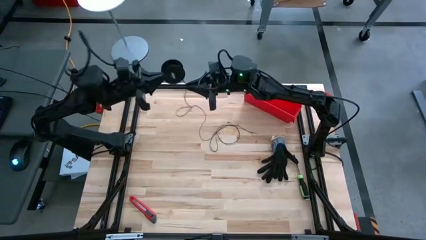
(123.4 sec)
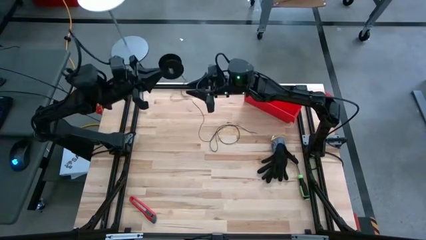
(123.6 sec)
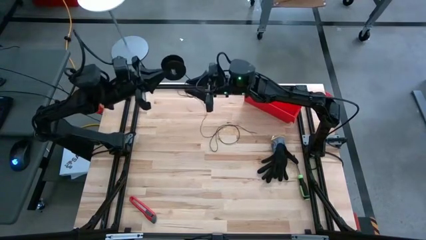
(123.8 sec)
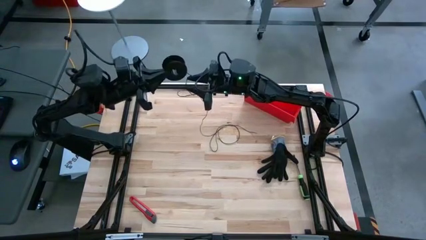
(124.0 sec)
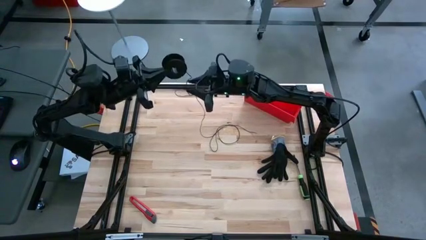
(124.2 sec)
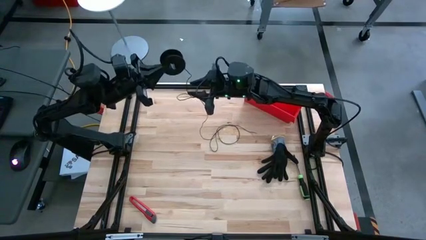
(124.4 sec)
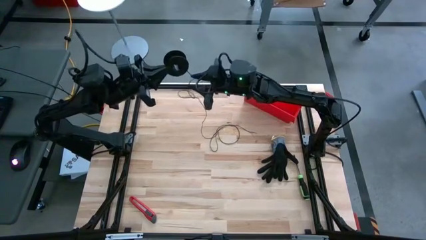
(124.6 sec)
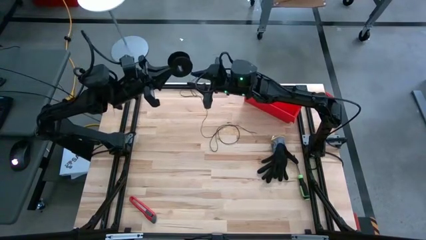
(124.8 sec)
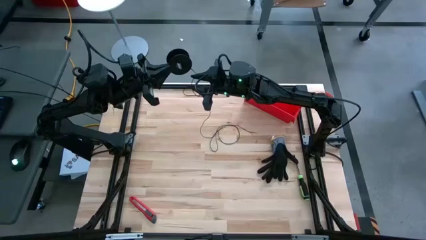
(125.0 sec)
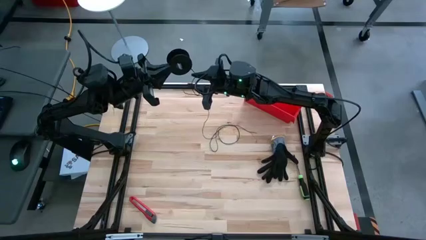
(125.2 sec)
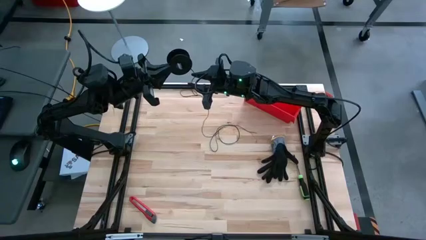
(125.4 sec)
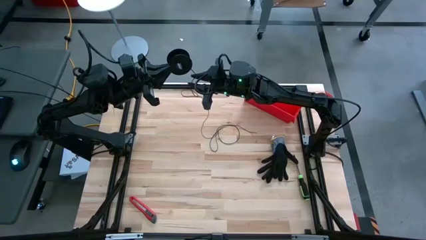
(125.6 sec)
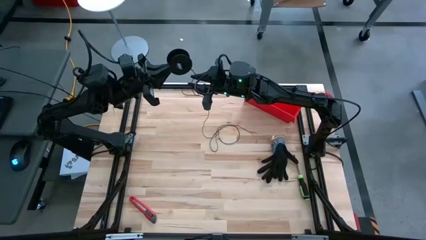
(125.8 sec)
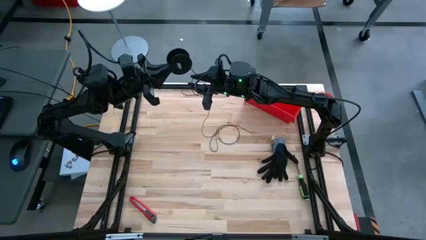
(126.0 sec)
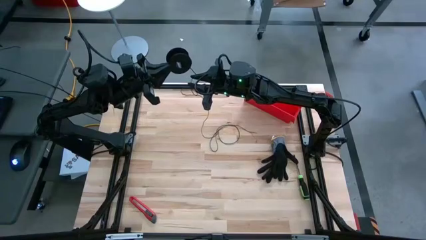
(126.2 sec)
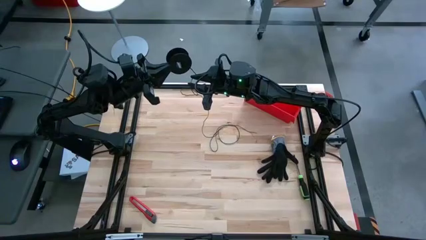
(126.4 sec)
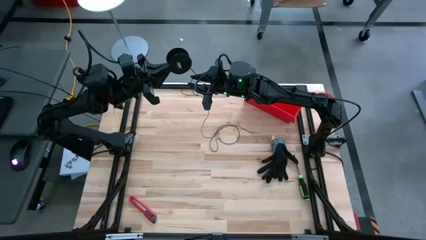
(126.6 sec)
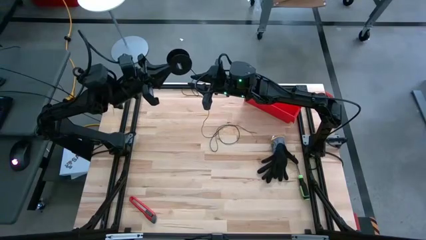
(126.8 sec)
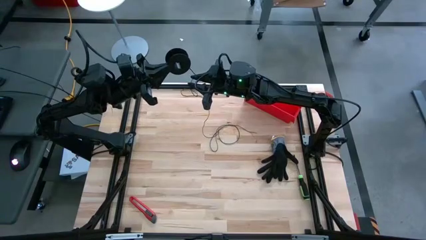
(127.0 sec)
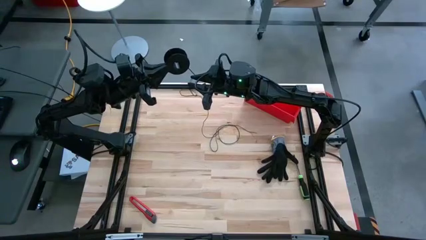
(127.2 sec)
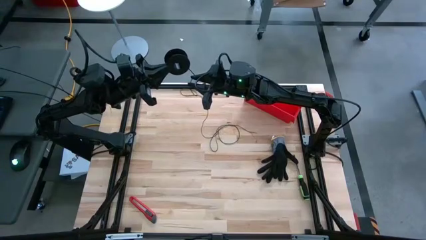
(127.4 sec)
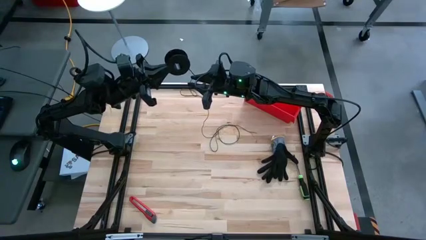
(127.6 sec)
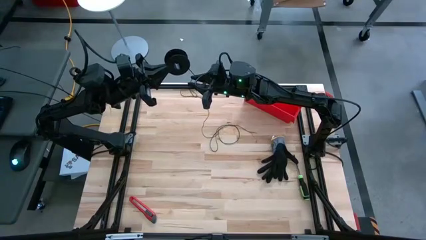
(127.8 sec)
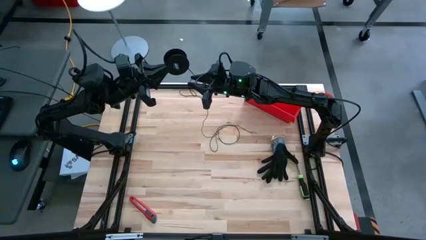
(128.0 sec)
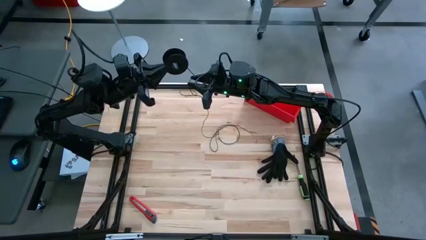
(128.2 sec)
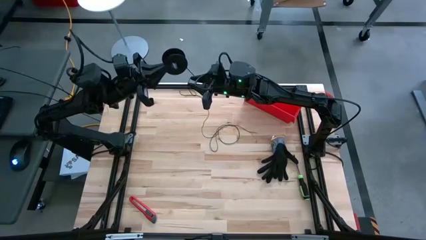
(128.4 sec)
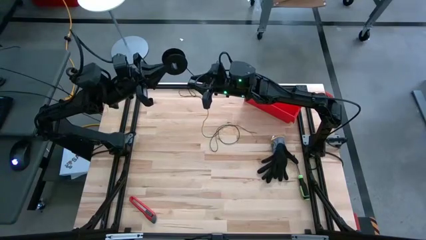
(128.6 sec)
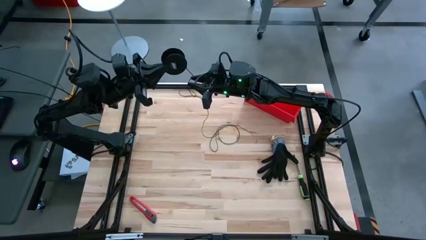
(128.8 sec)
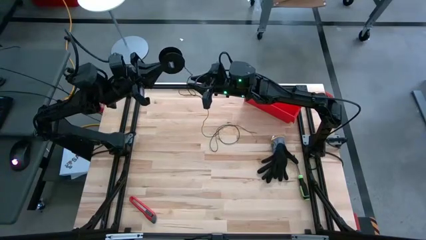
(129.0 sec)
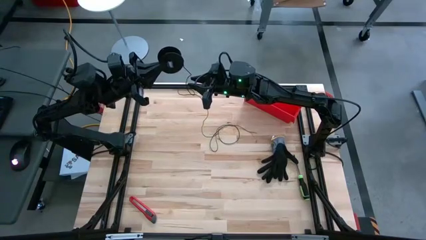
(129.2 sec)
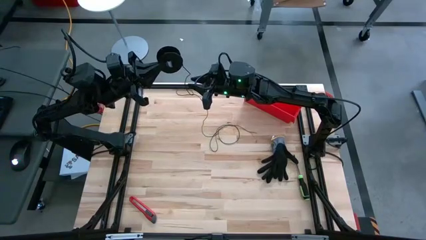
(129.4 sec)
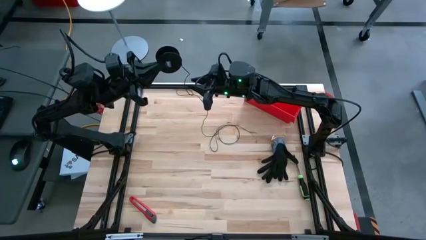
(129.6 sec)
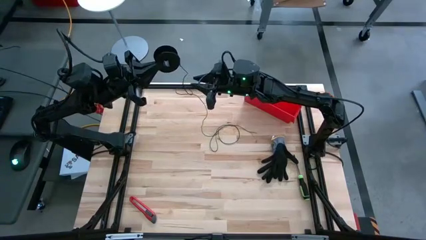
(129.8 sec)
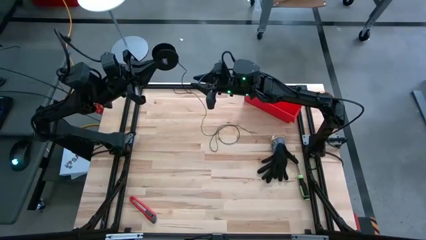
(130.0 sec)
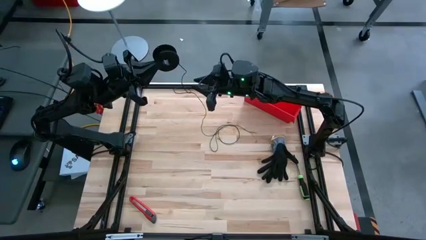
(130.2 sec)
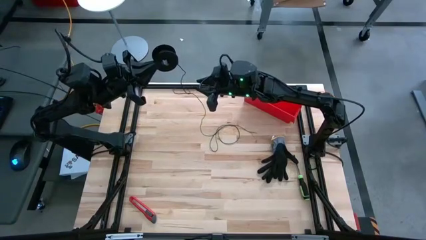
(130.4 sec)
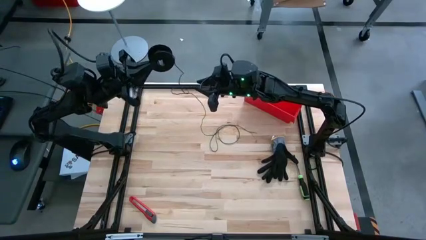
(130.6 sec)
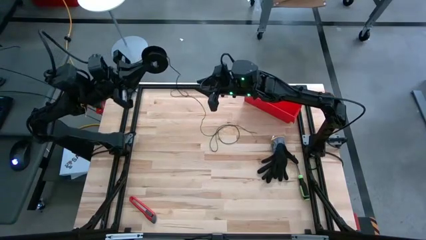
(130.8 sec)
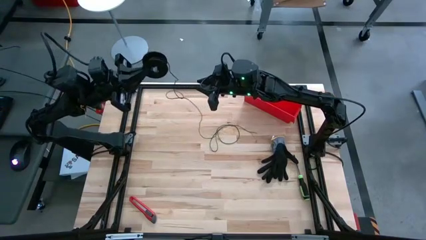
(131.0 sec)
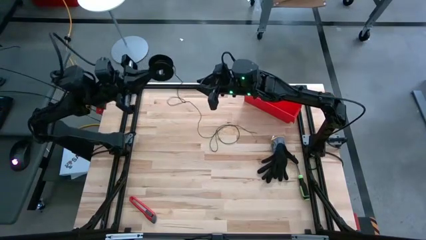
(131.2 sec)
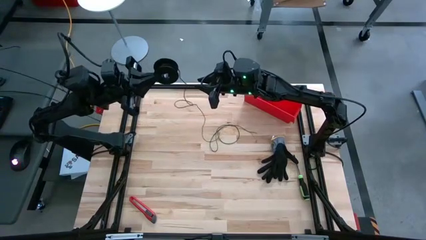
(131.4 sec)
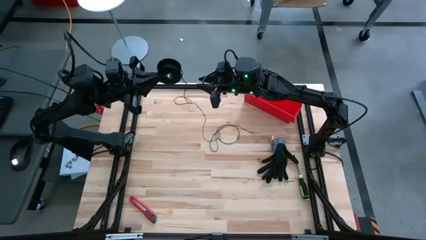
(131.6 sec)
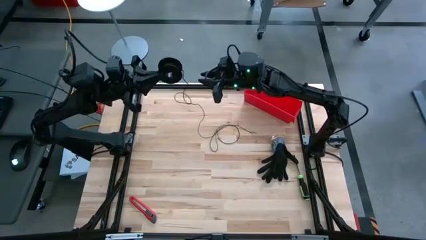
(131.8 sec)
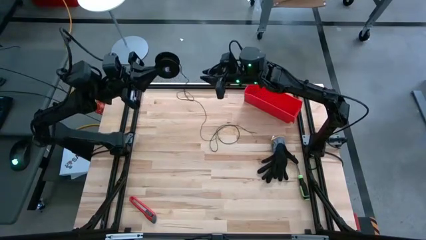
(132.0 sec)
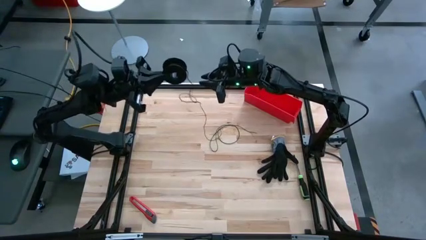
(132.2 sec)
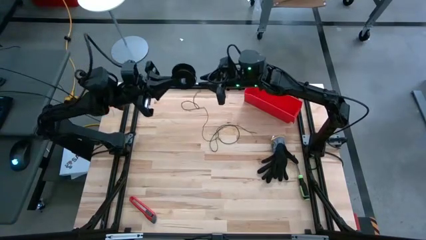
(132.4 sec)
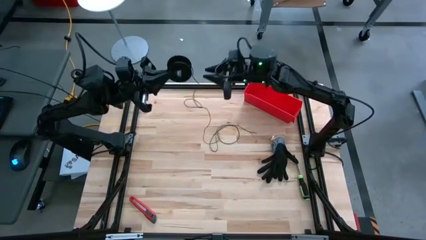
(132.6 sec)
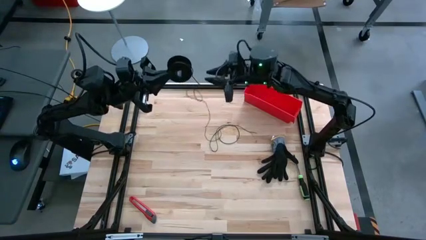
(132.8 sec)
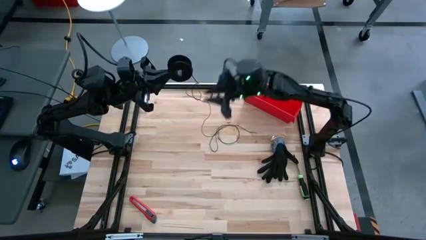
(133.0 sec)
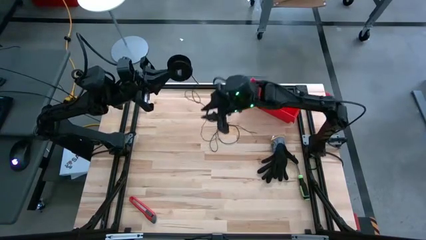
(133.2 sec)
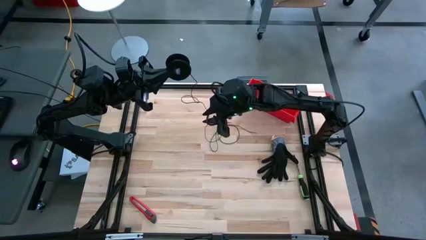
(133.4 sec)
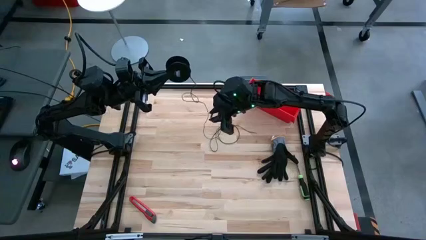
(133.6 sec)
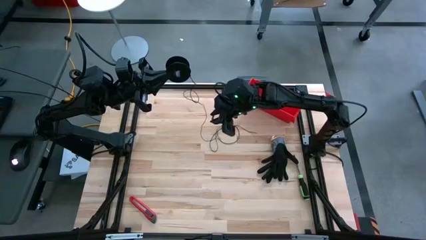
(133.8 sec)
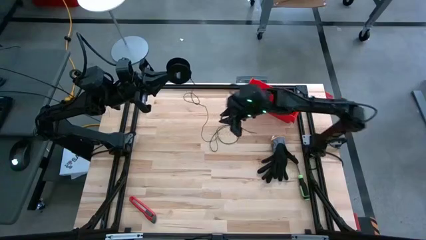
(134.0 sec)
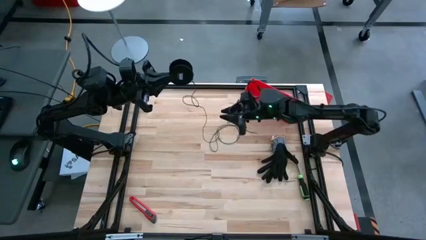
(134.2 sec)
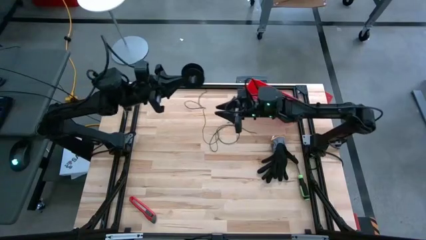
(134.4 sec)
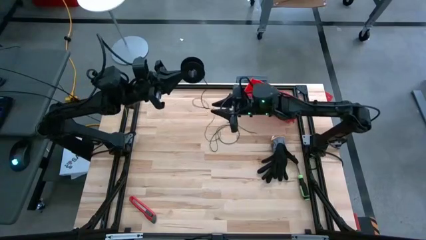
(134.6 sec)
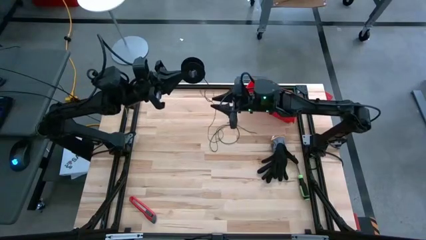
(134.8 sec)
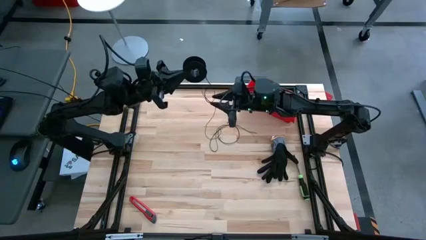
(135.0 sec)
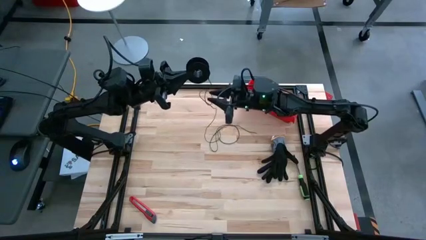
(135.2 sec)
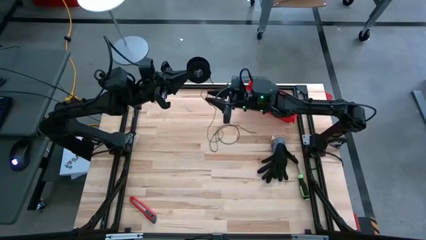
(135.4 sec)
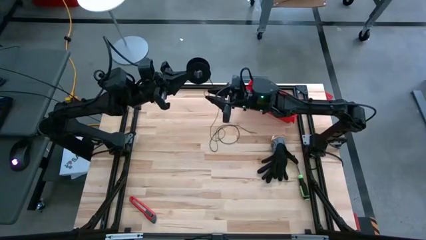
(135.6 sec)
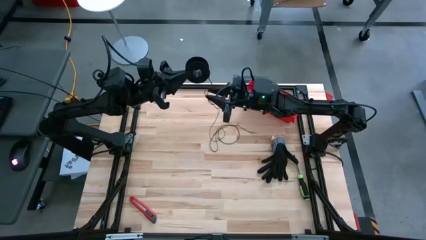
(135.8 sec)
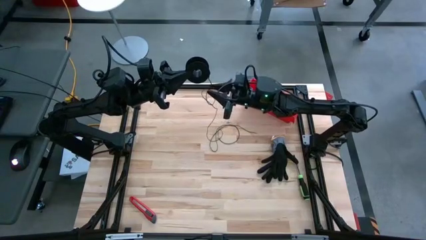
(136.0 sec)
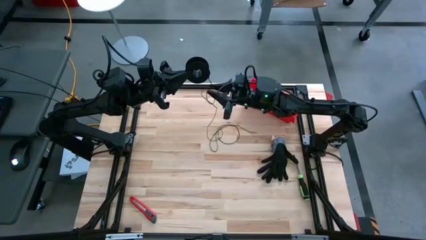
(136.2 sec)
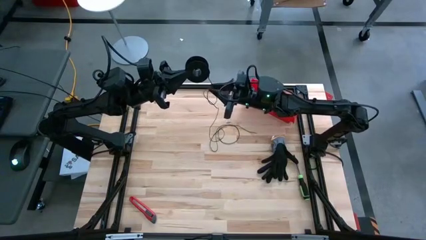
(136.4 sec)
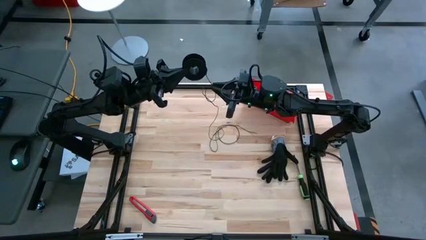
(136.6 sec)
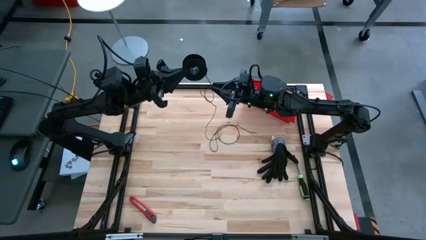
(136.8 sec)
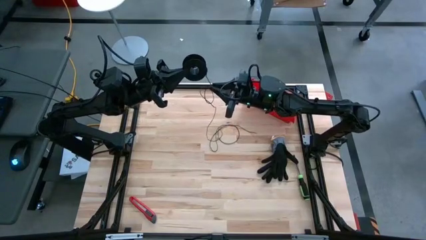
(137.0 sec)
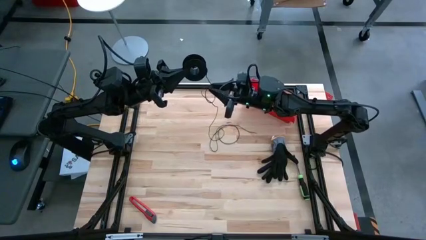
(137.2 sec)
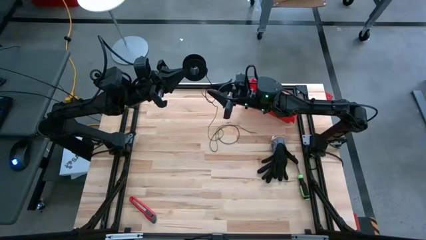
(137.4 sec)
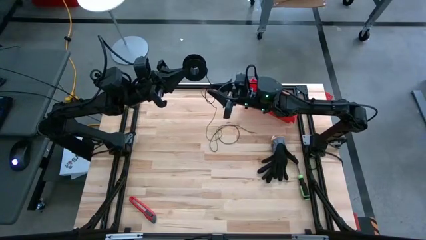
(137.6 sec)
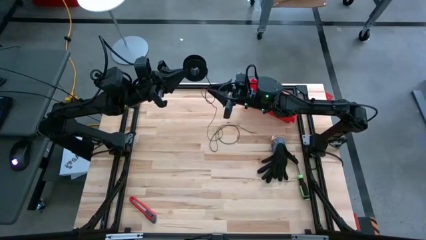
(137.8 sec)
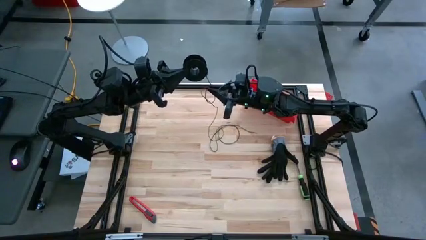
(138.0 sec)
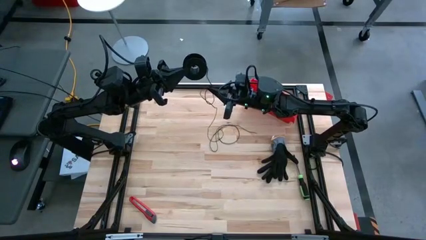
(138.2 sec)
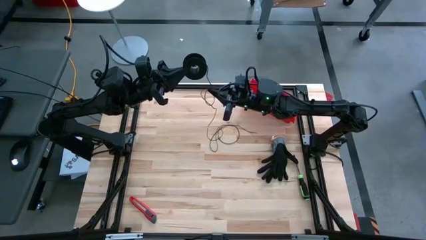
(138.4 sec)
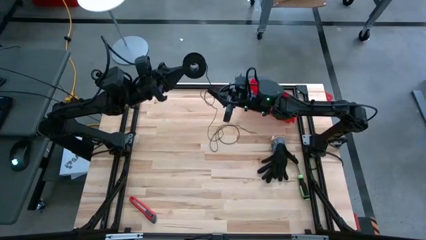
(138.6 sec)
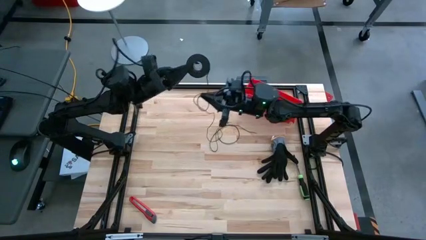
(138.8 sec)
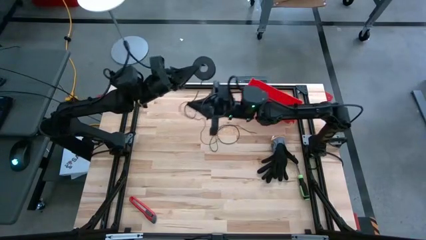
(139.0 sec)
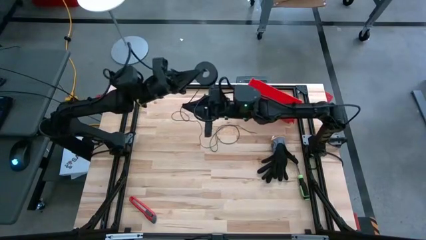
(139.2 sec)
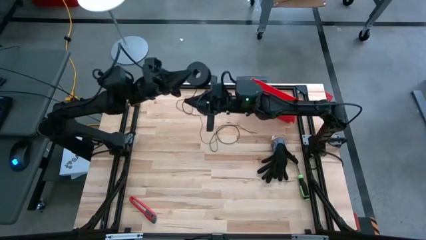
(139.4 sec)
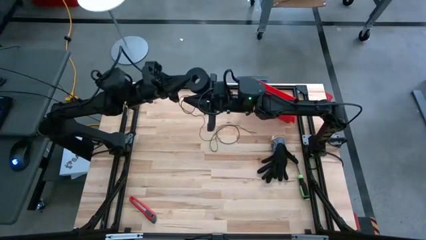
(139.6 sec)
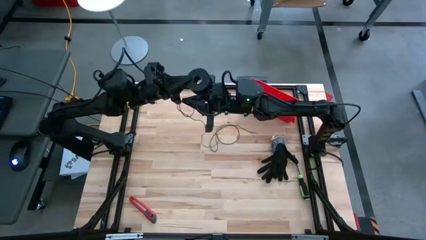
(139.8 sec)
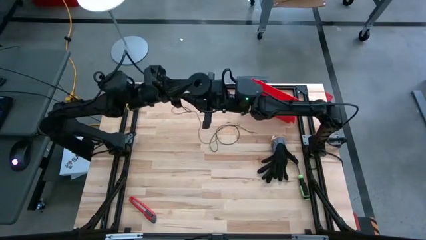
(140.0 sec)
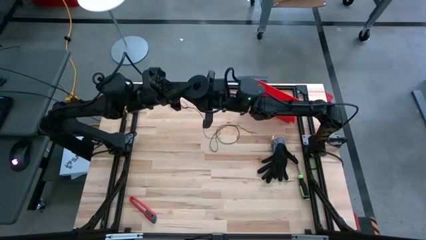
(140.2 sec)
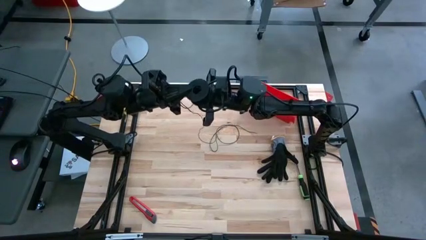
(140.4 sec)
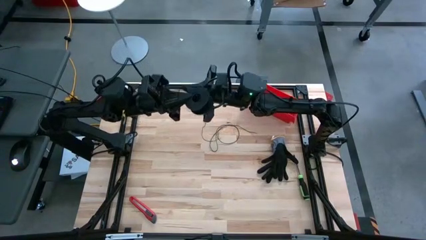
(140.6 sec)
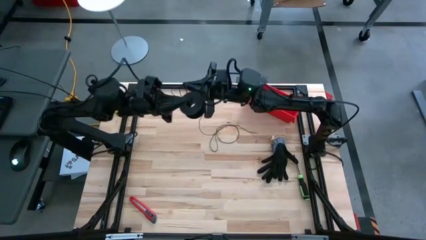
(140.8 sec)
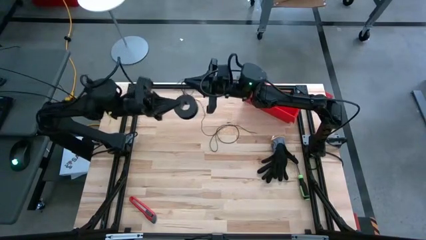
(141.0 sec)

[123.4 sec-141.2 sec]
Task: Coil cords
Coil the black wire on the spool
